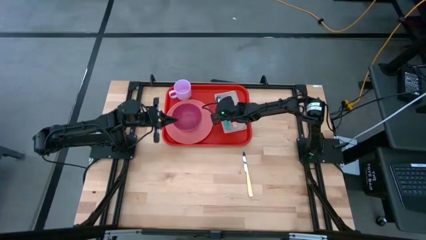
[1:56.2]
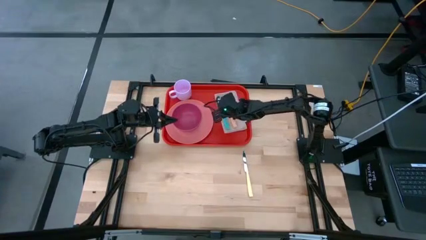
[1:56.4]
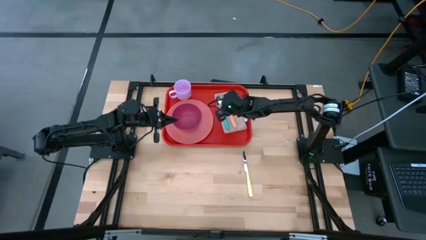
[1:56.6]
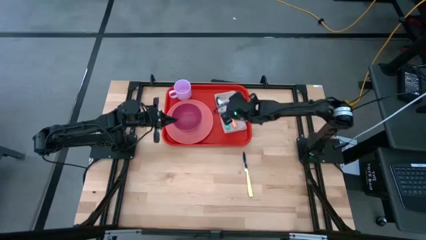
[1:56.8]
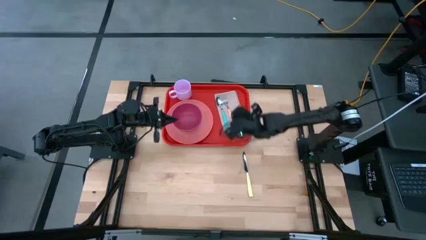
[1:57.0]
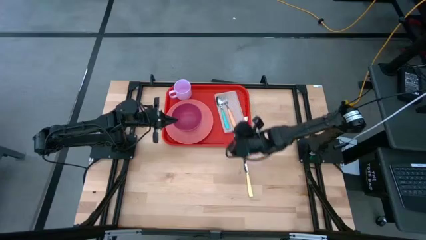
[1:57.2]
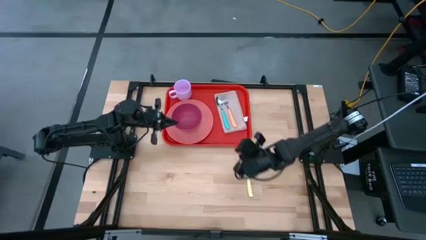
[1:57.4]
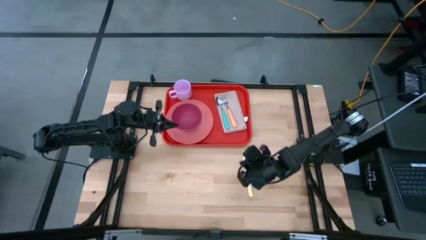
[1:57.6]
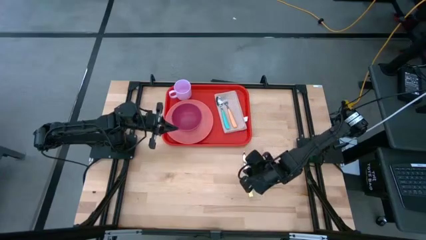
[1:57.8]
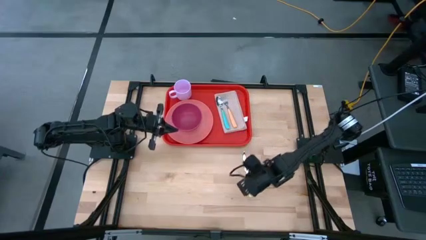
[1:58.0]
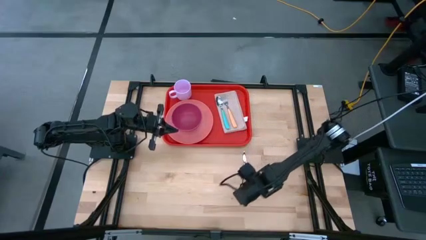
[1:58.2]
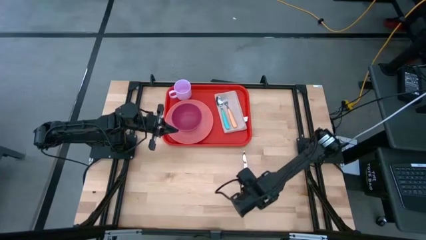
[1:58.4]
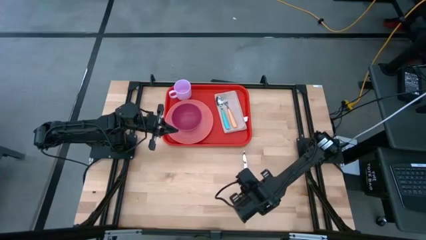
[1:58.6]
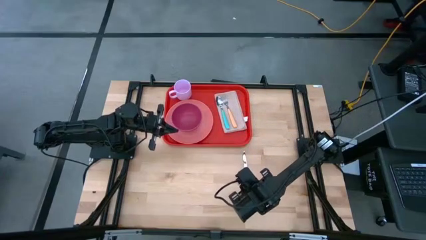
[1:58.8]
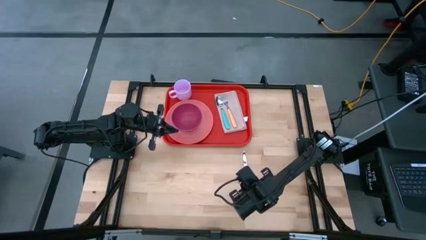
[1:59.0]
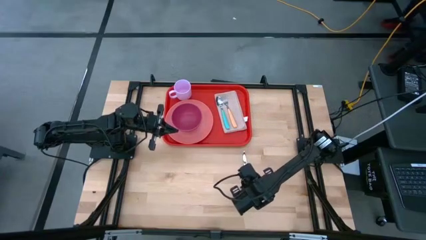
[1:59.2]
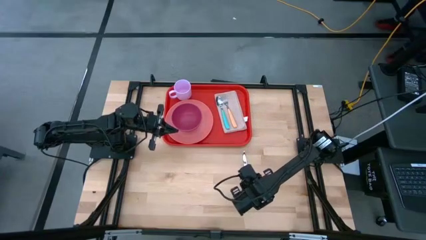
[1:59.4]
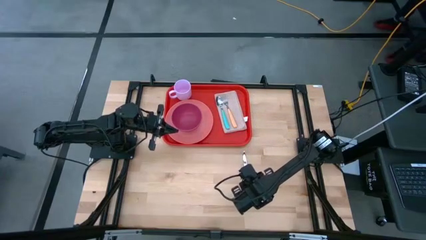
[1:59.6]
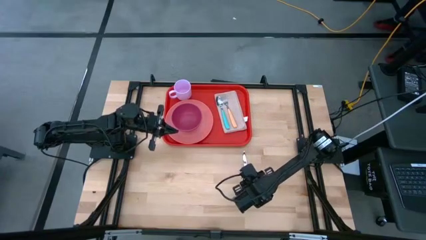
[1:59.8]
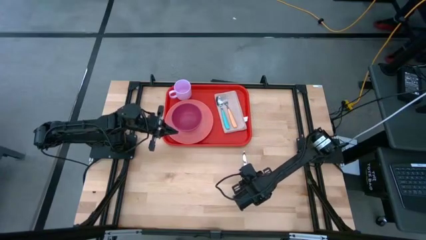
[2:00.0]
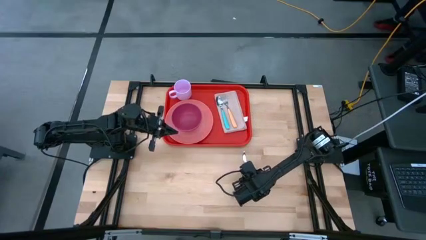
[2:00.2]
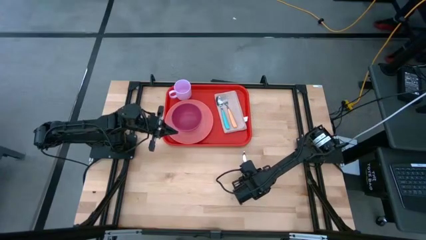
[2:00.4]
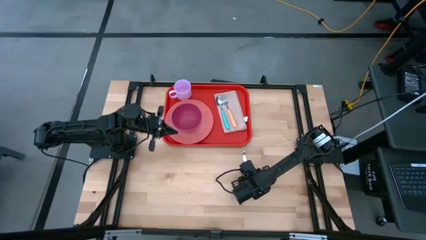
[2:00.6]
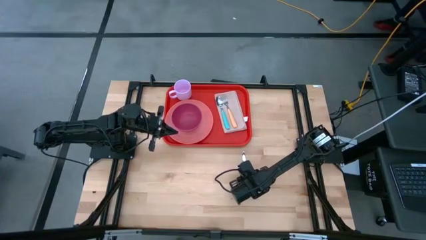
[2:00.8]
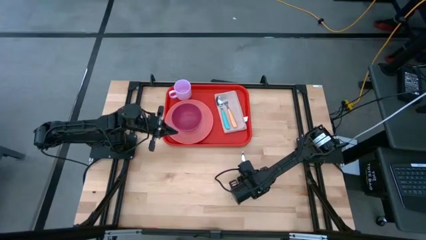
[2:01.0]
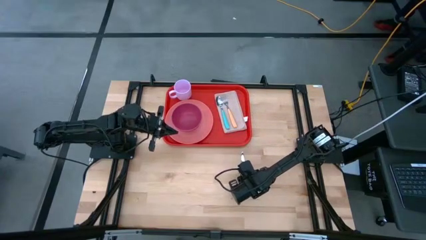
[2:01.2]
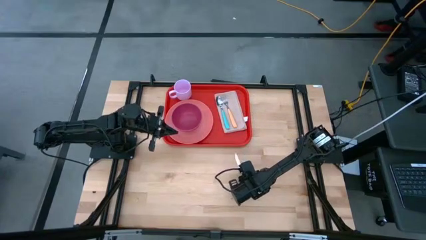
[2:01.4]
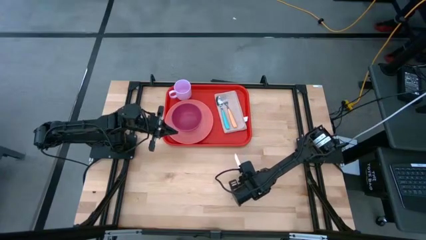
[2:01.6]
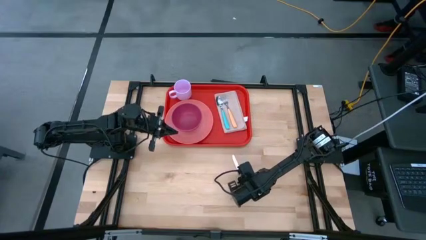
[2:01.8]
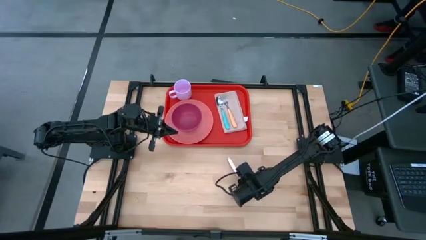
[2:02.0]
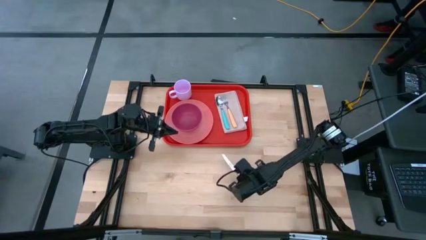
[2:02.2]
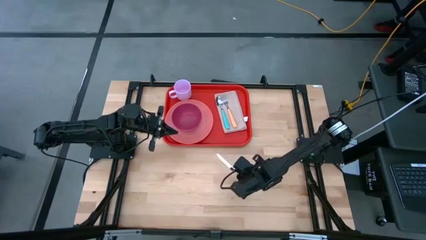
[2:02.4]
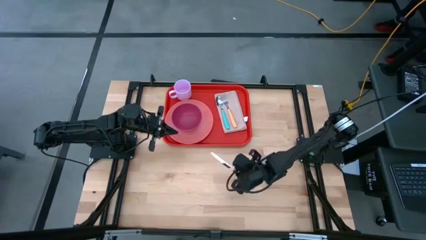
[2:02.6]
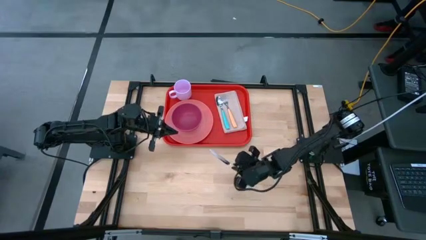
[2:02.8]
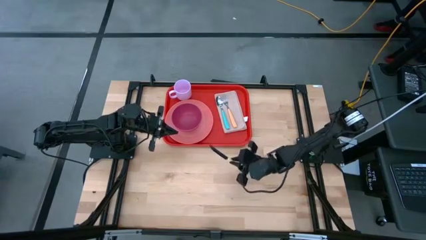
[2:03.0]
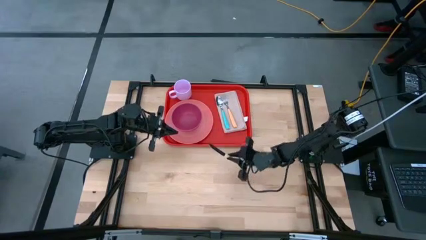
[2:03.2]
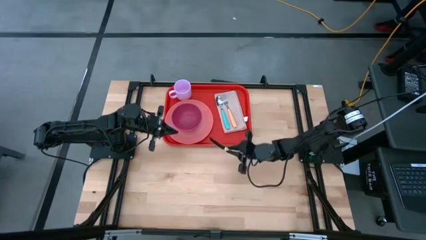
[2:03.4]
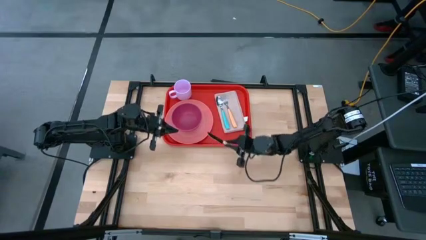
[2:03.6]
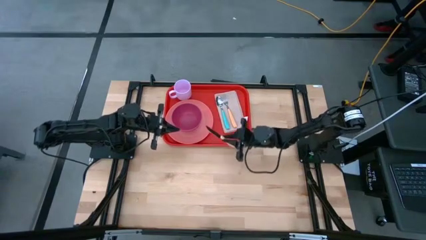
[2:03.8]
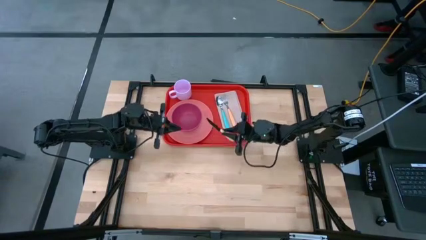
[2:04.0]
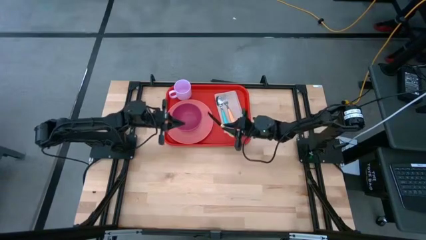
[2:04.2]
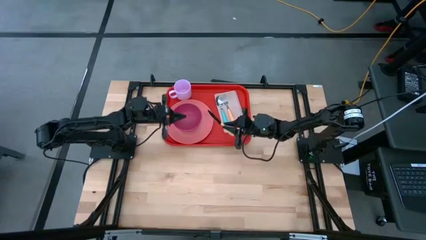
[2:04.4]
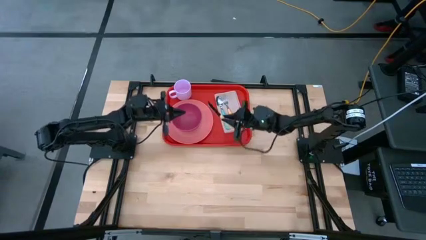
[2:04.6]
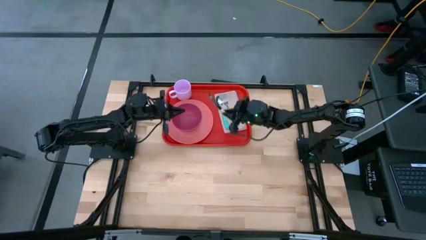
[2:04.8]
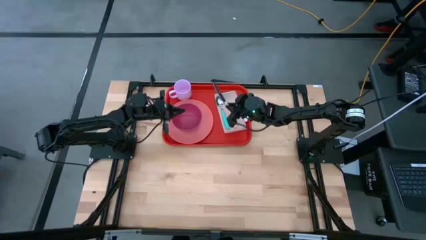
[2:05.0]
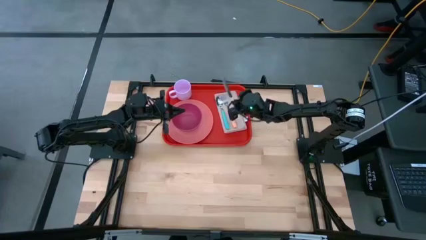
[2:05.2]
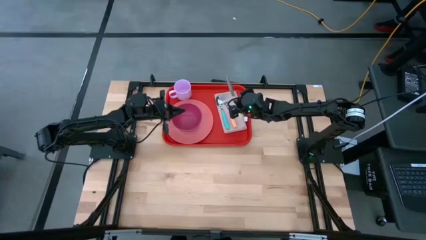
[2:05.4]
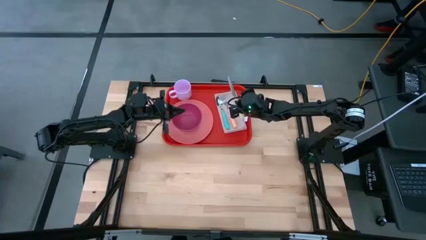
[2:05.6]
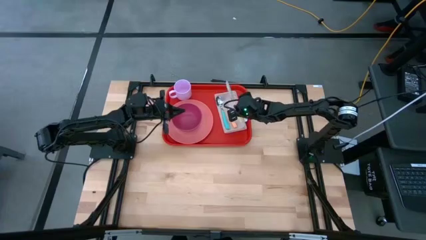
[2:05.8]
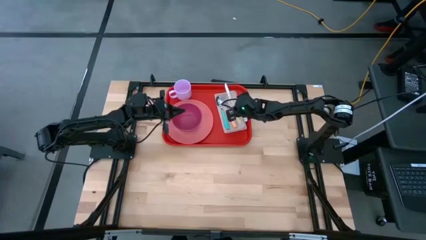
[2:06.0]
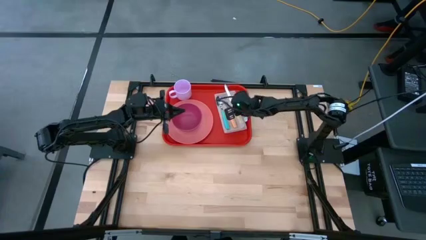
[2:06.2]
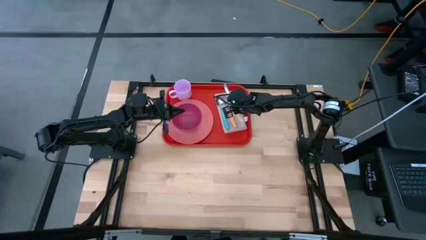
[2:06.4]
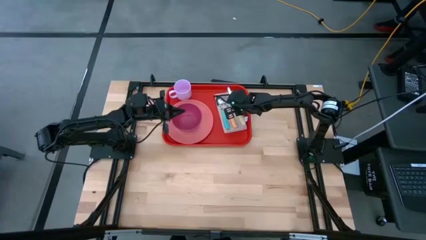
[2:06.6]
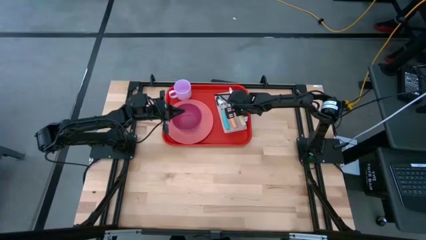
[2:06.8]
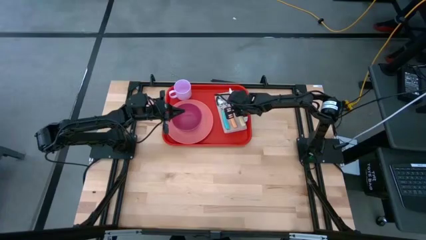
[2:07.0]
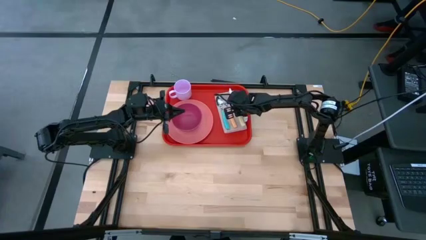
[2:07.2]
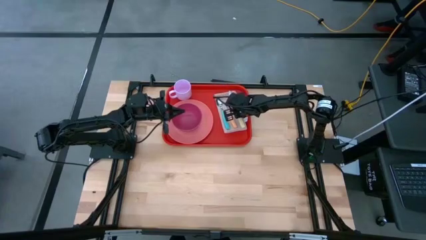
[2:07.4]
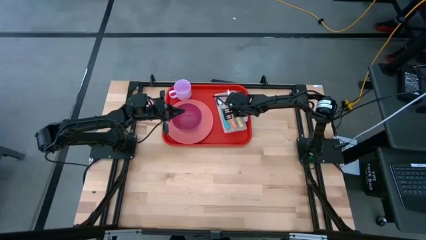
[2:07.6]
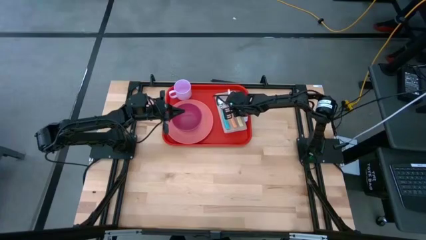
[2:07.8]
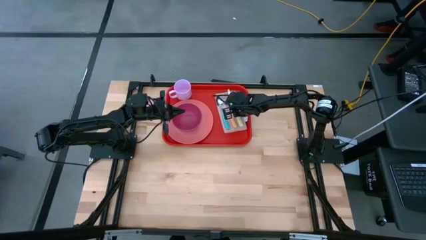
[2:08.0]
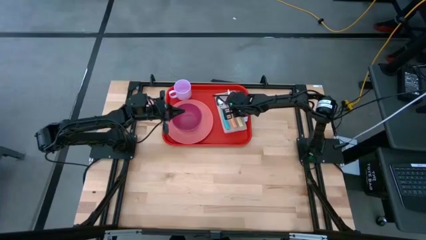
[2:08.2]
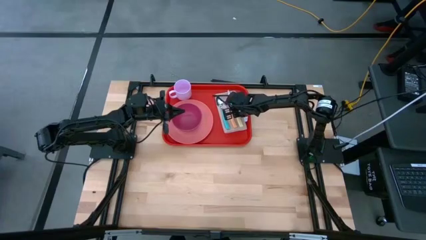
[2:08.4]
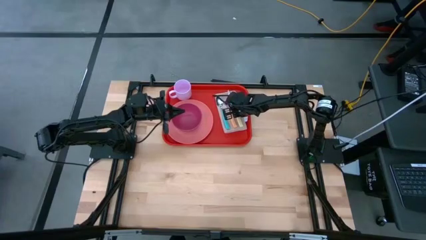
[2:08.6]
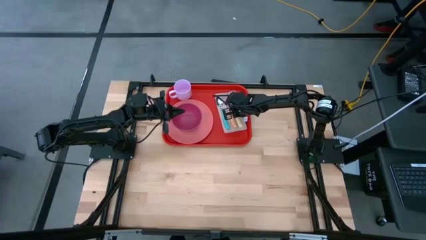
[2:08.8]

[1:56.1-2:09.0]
Task: Set up tray
Put the yellow knife on top of the white table napkin to the right of the orange fork

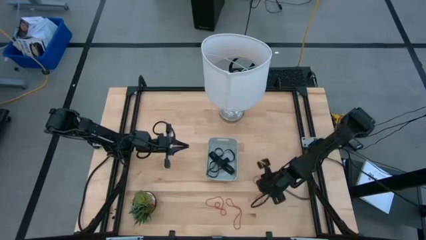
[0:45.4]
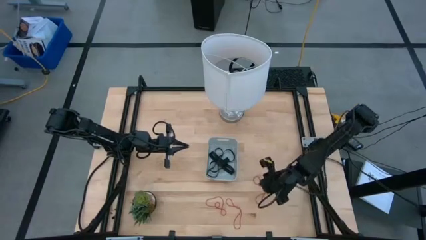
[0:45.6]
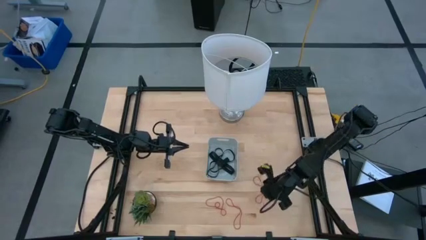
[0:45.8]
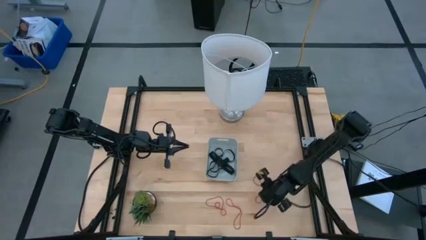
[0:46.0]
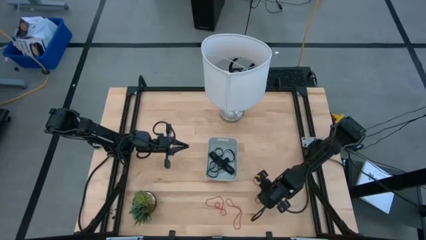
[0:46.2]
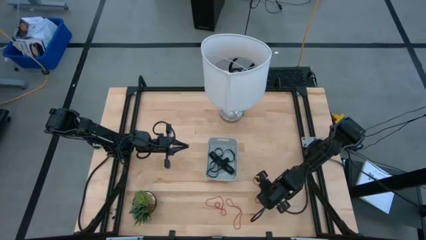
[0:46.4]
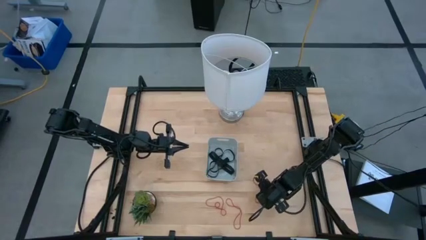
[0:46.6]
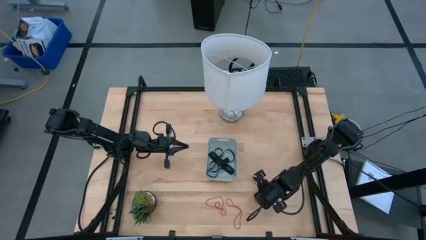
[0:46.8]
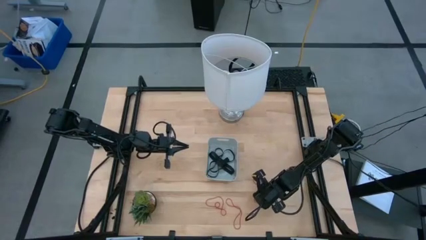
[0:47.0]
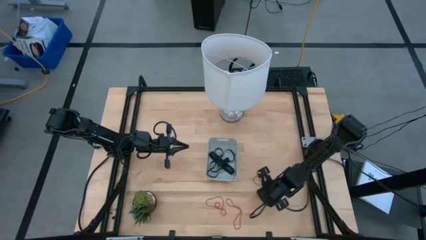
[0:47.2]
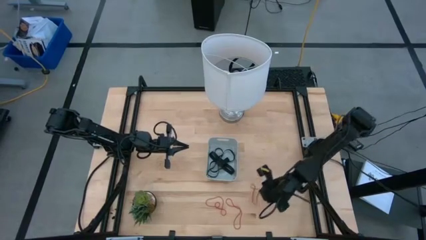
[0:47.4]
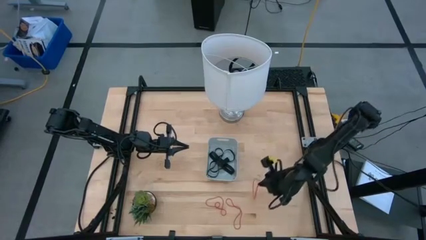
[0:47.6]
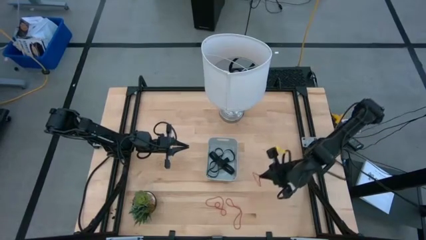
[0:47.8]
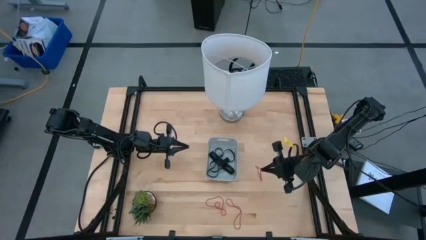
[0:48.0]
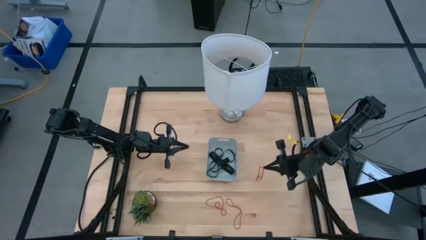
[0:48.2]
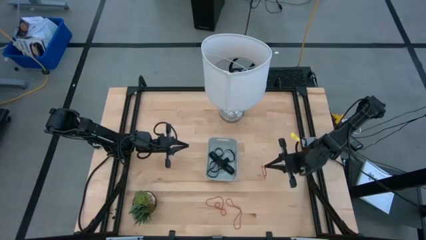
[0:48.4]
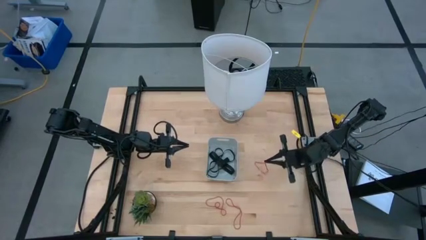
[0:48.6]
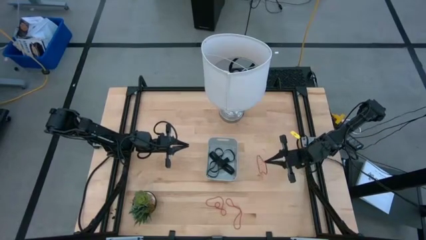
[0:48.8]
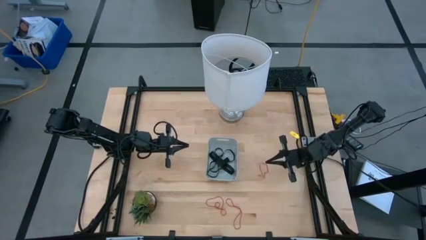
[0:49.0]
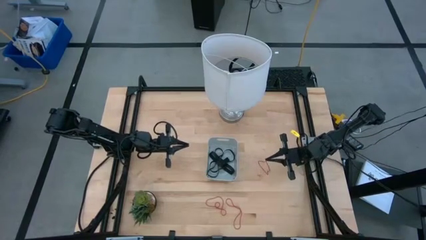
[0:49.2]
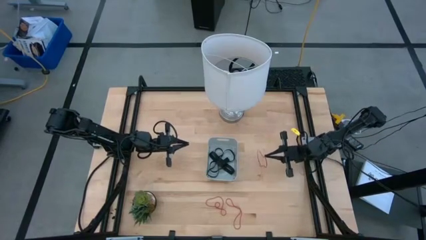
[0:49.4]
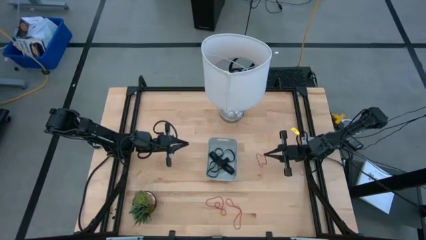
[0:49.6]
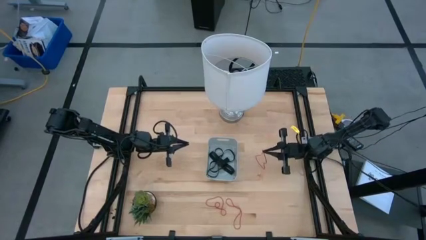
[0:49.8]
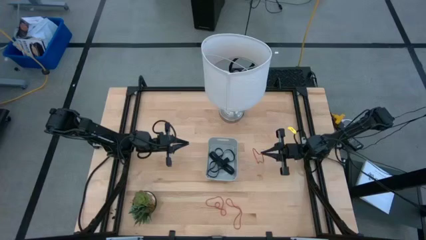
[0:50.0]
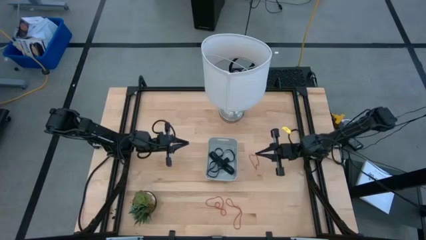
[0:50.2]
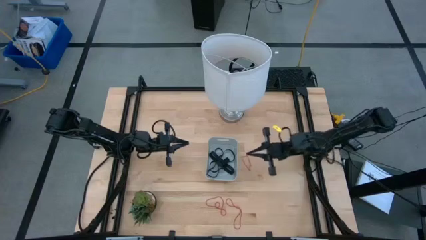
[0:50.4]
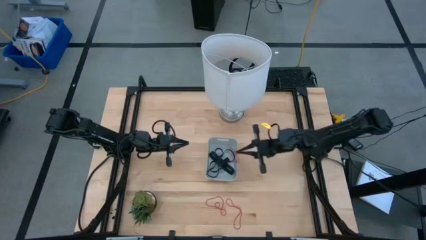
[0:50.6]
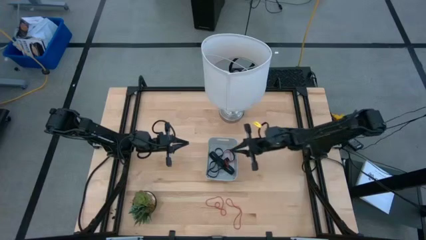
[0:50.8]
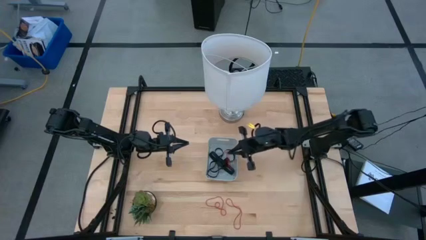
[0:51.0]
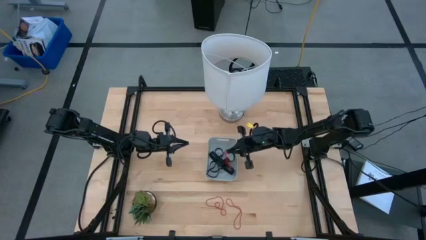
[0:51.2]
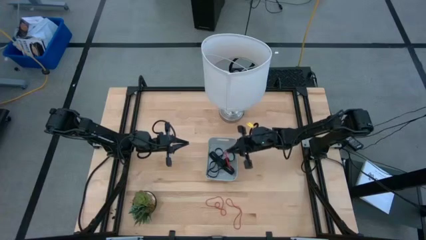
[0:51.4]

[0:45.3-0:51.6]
Task: Pick and place rubber bands into bin
Put the red rubber band into the gray bin
